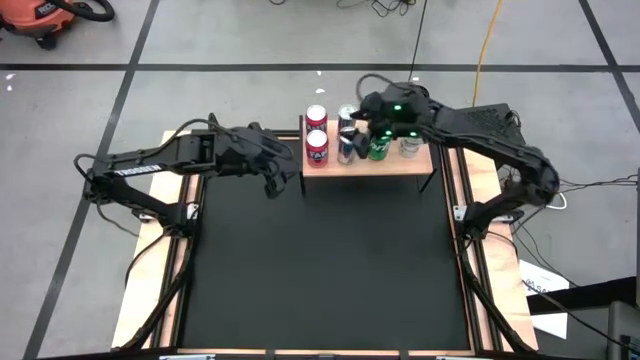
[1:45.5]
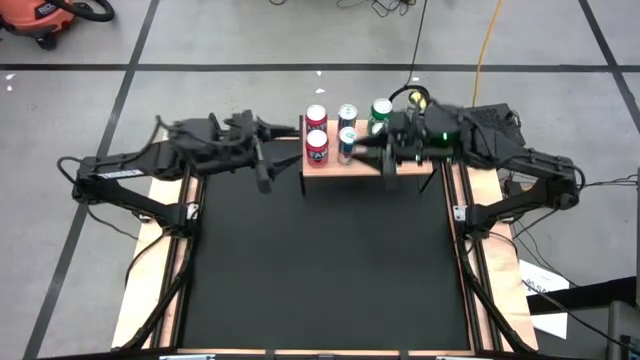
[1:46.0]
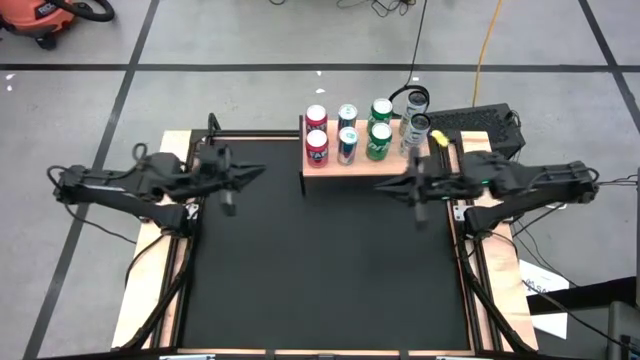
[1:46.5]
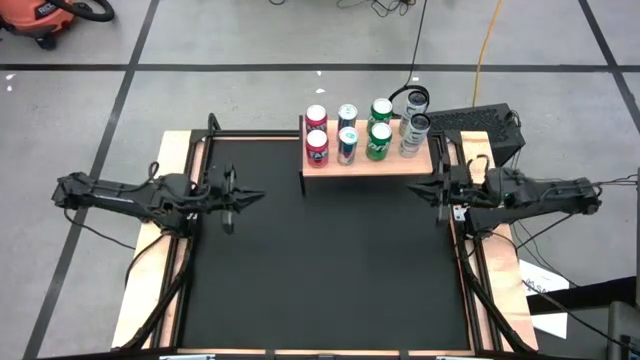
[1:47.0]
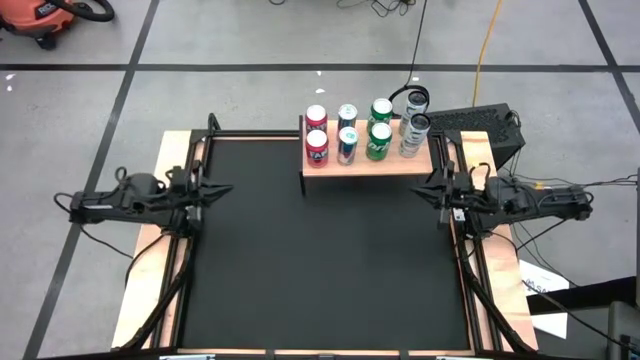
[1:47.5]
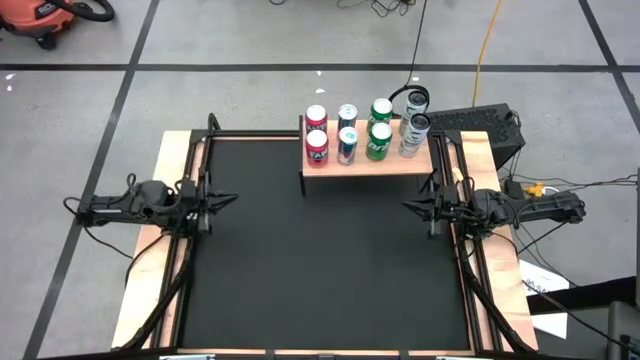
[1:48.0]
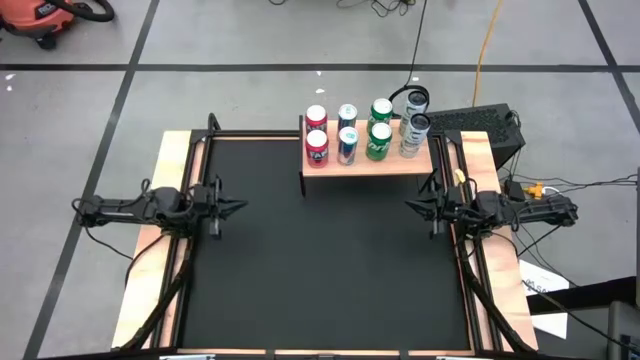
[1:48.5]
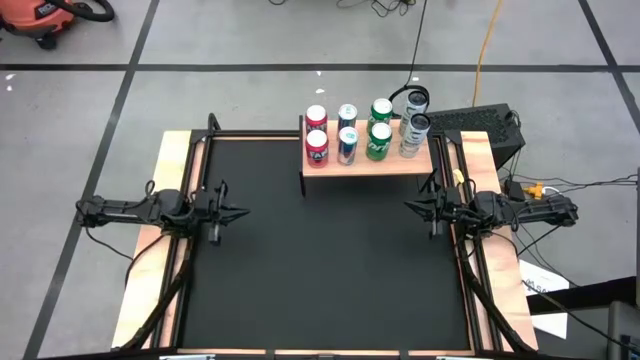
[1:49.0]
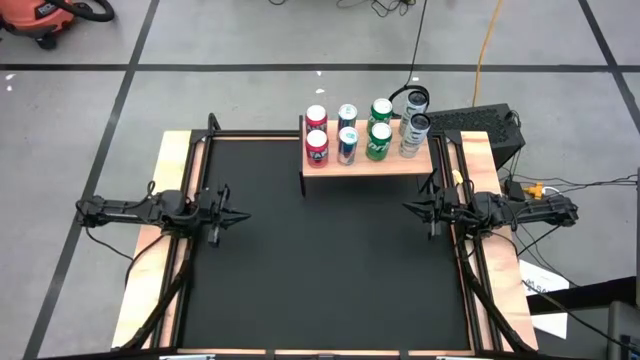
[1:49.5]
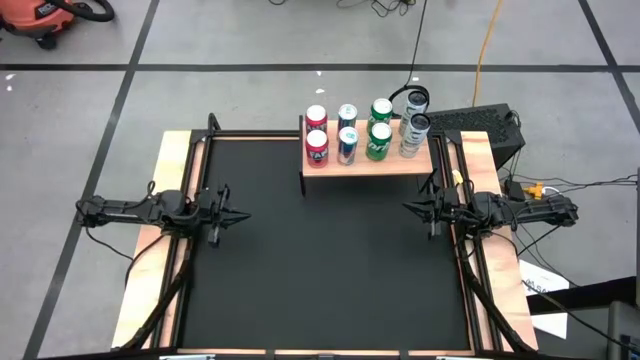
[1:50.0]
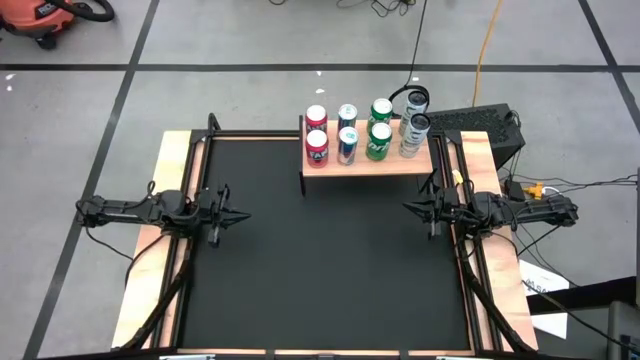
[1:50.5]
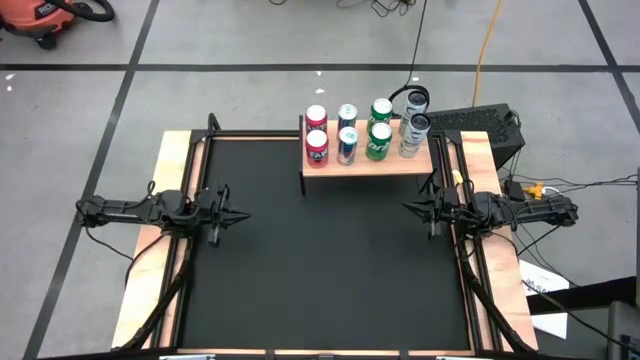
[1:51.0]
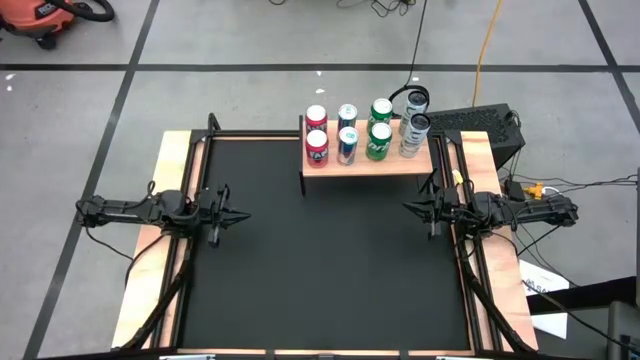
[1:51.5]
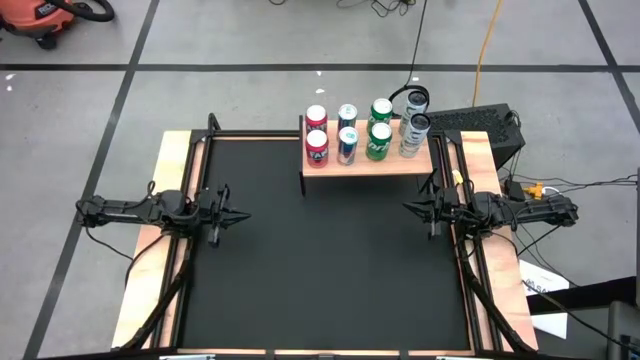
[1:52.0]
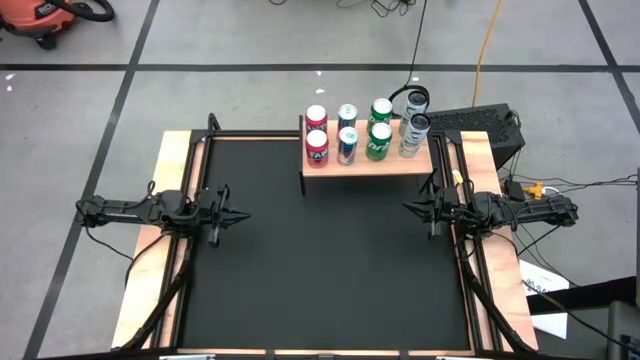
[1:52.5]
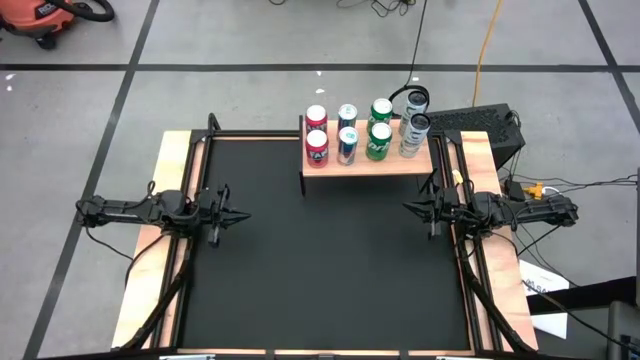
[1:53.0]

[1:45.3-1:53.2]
Task: Place canned beverage on shelf
Return to Home Position

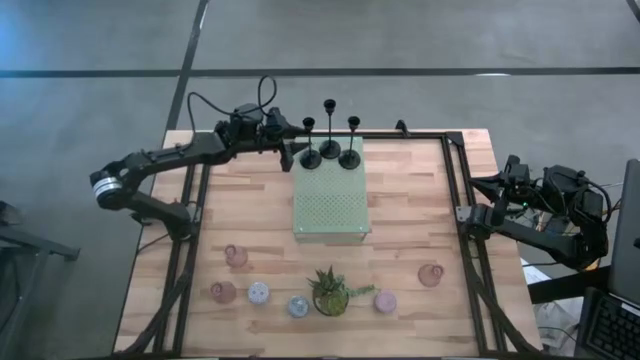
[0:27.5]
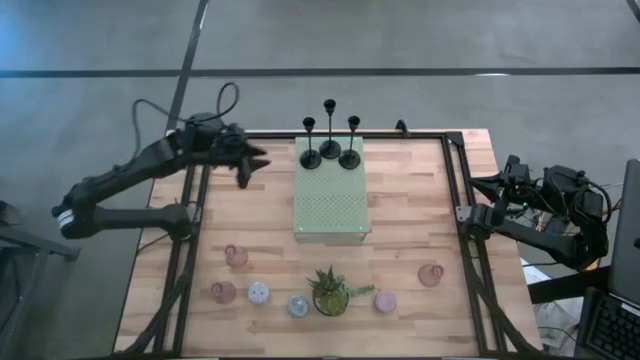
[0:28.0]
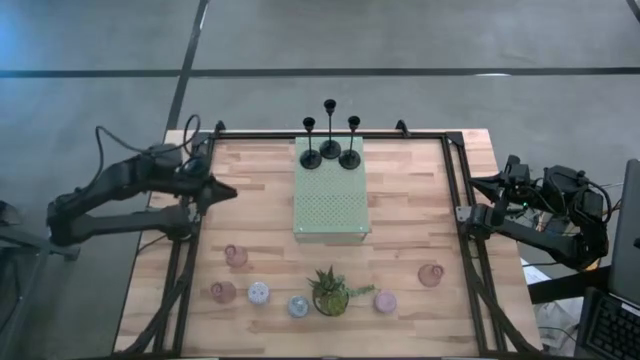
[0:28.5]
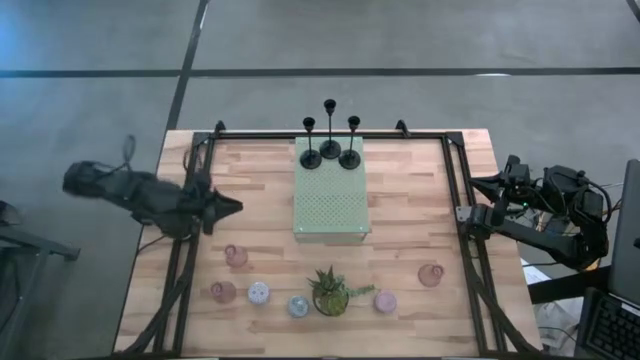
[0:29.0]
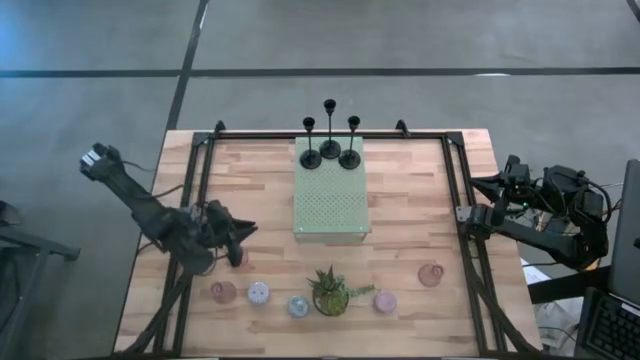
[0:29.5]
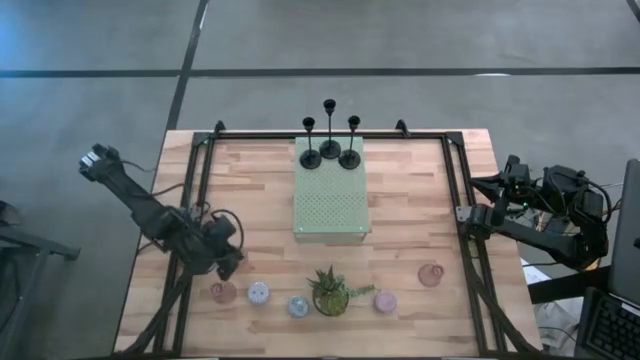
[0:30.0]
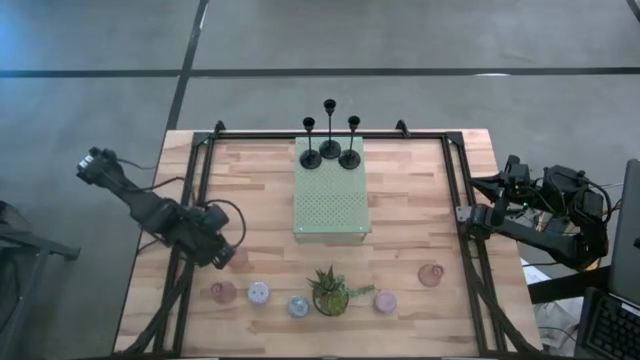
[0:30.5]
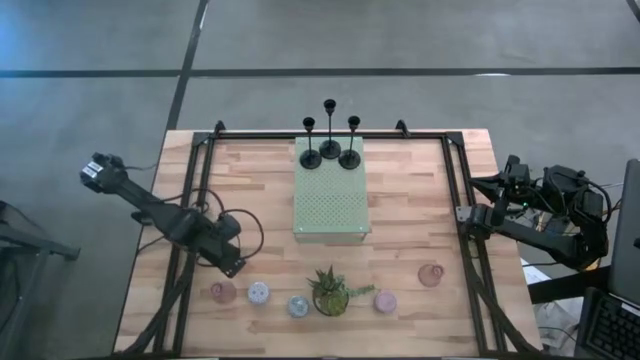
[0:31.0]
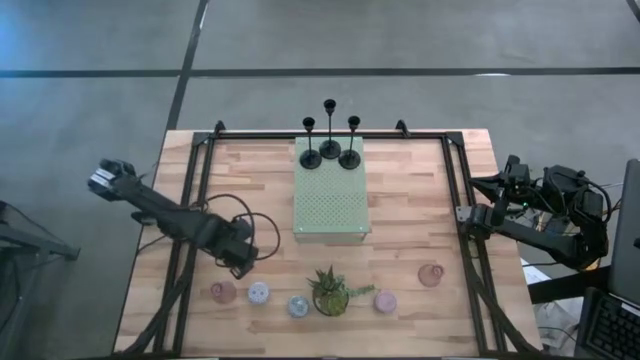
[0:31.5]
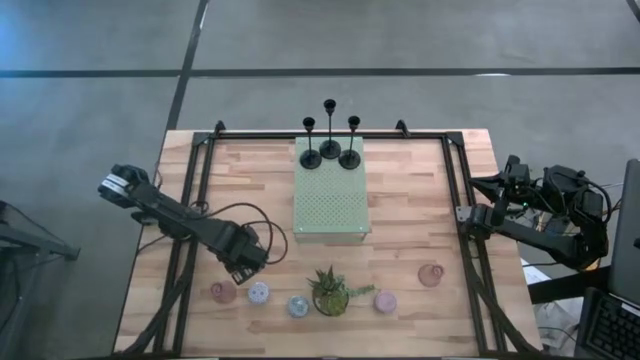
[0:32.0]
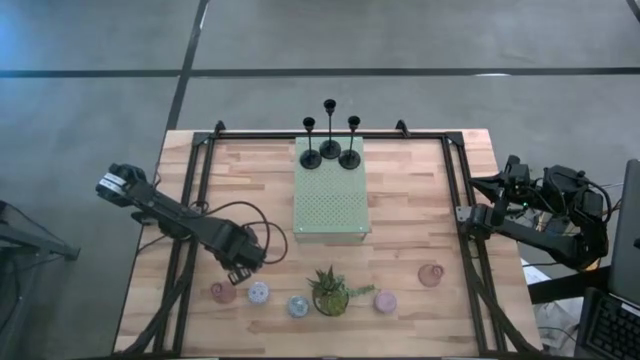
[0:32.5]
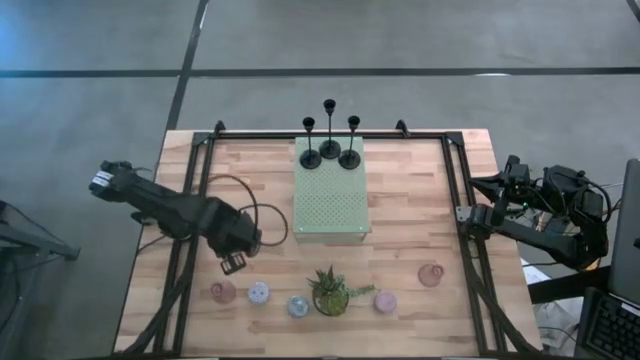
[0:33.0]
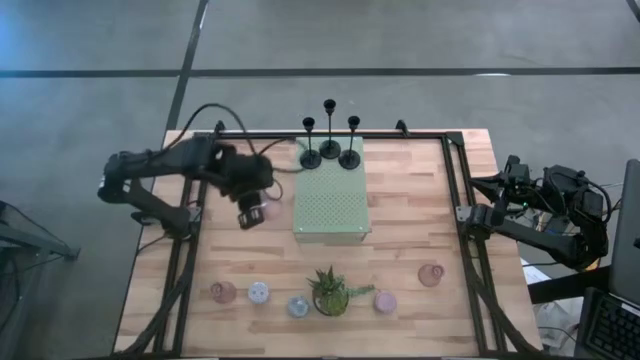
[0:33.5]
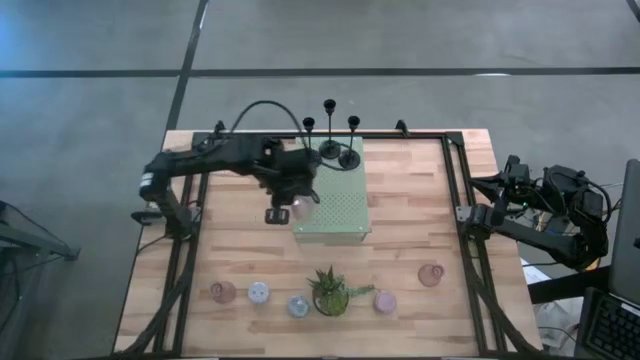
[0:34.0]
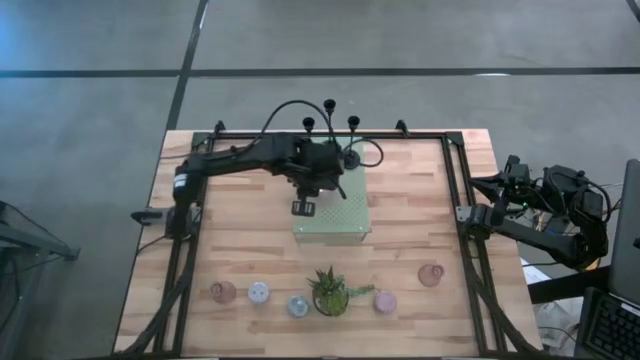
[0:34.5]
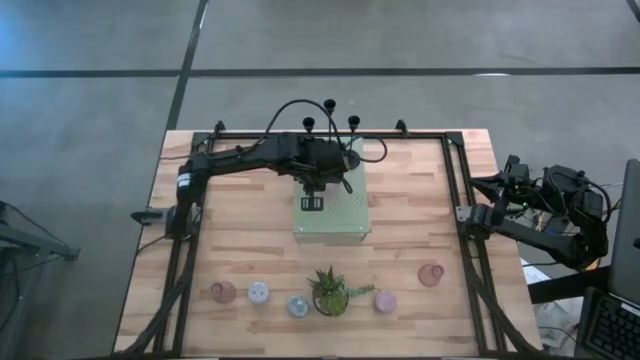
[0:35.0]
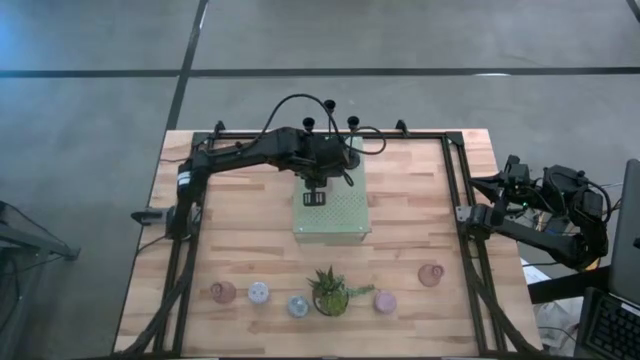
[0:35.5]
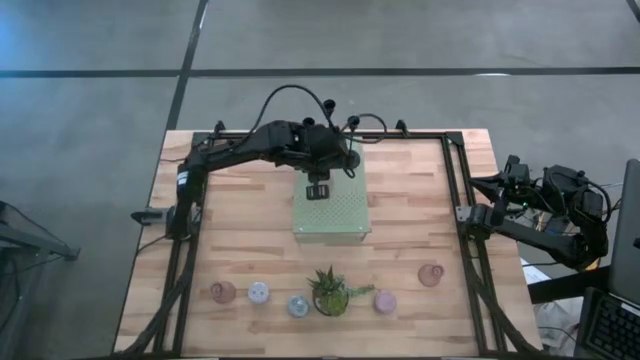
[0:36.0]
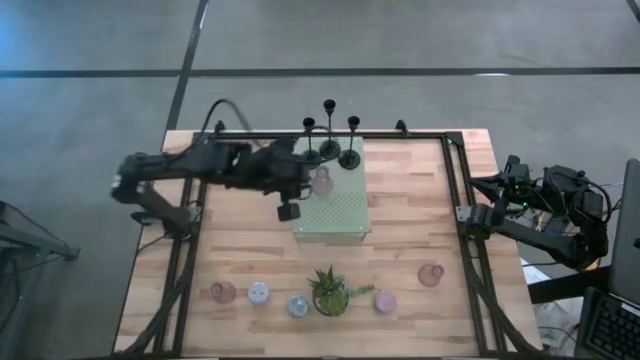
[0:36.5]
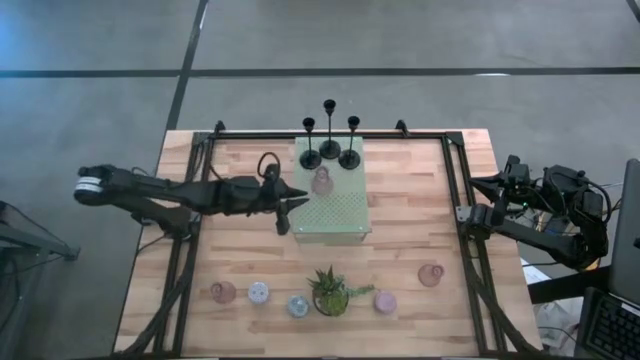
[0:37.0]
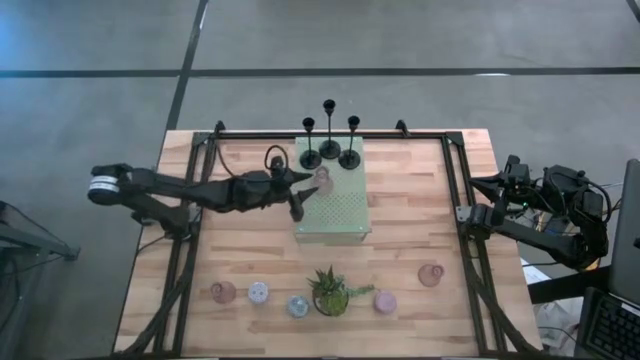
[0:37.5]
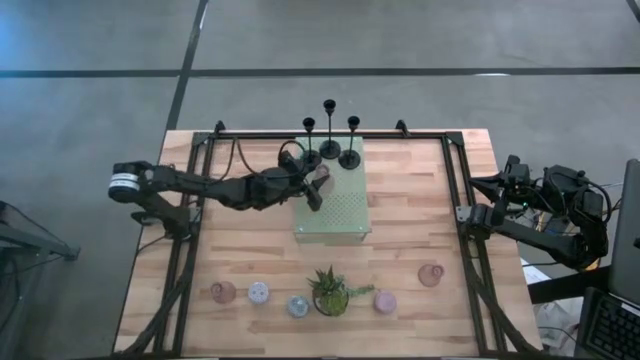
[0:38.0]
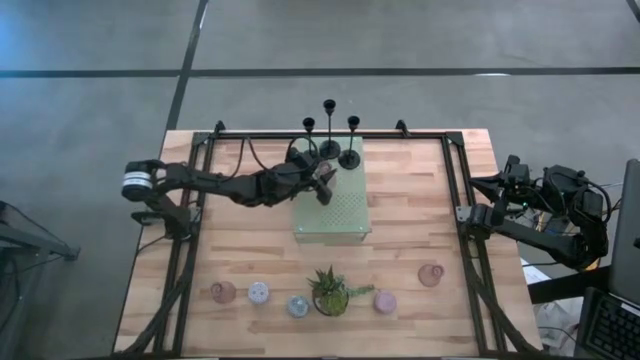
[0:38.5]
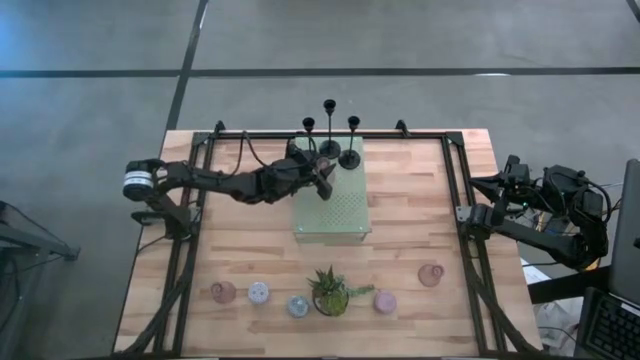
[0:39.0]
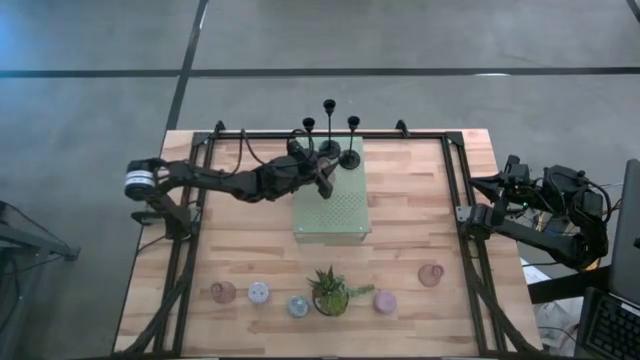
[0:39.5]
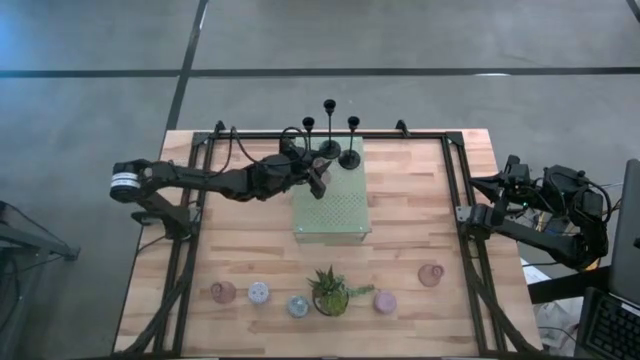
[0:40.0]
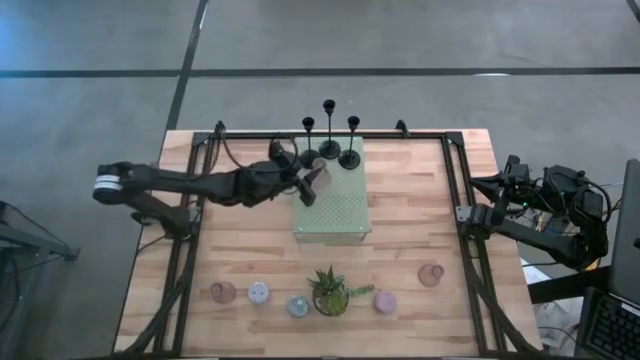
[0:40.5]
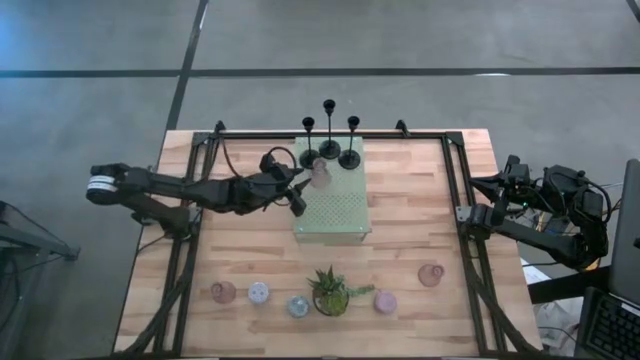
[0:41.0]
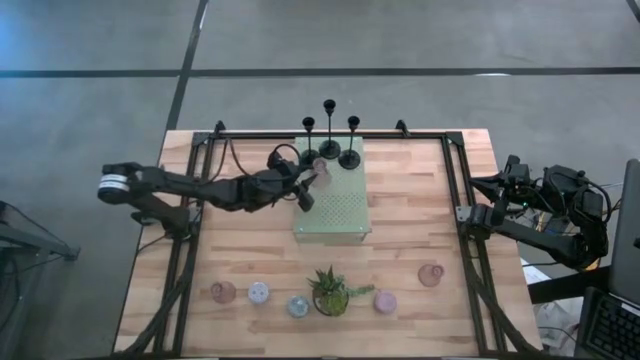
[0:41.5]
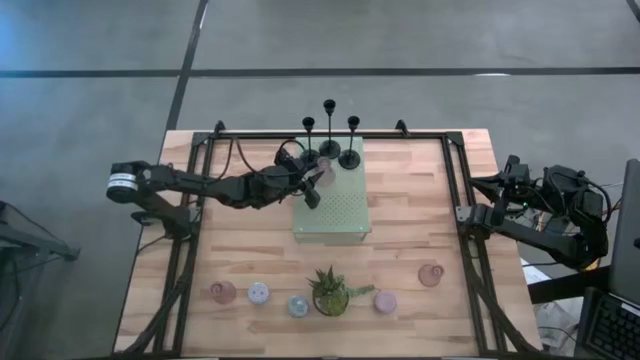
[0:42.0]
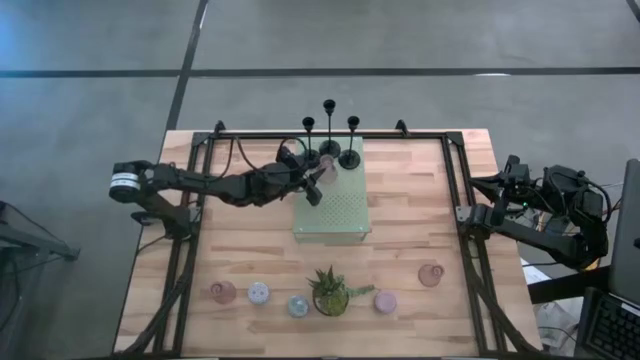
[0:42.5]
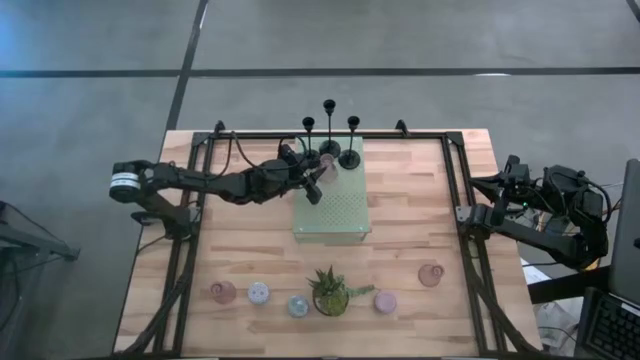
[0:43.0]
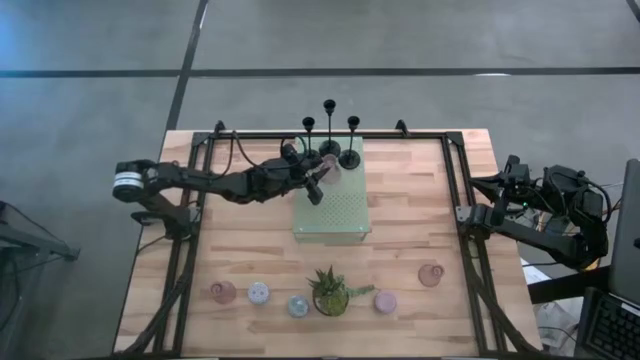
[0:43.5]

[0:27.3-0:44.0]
Task: Pick & Place candle stick holders
Put the top pink candle holder on the shelf
